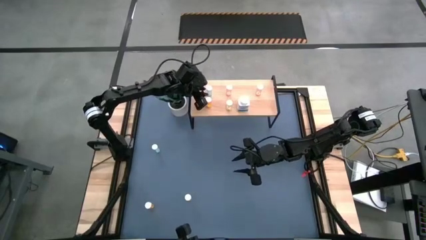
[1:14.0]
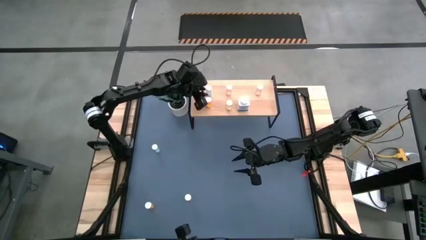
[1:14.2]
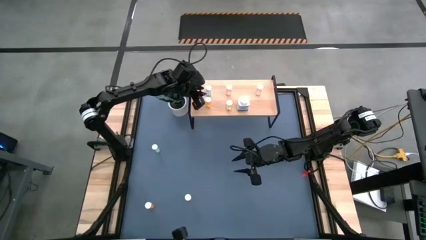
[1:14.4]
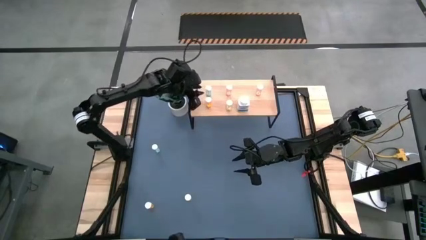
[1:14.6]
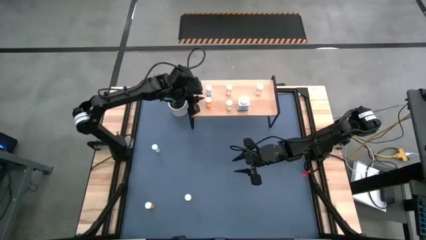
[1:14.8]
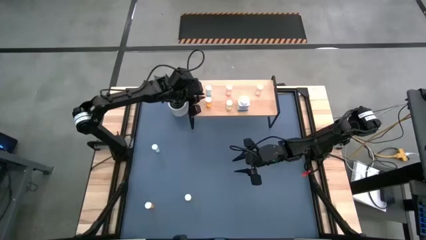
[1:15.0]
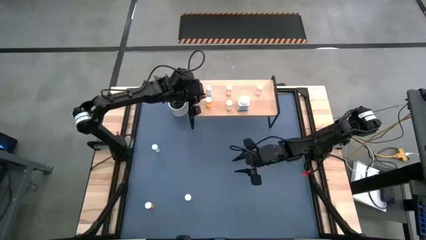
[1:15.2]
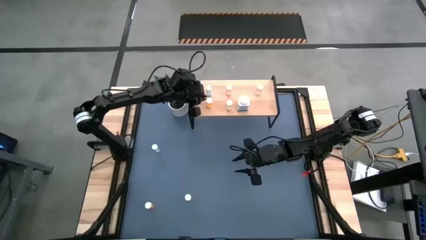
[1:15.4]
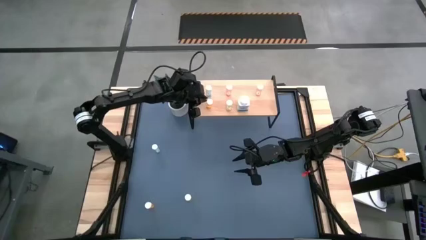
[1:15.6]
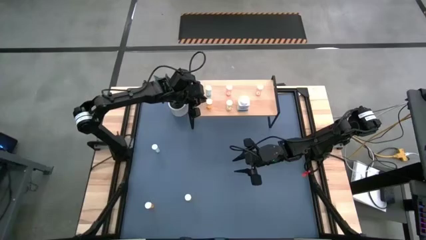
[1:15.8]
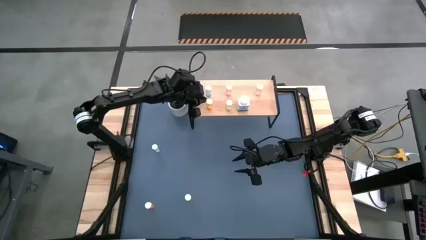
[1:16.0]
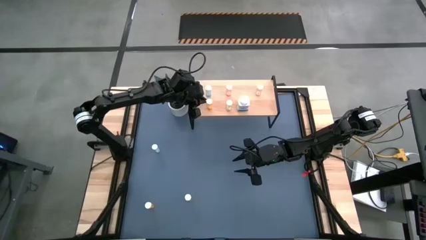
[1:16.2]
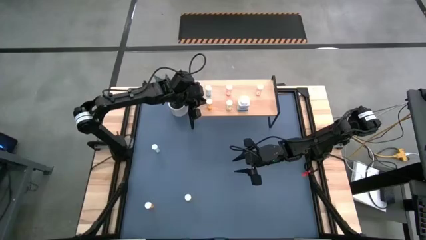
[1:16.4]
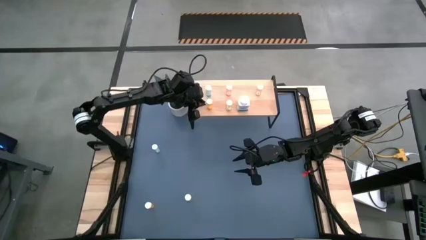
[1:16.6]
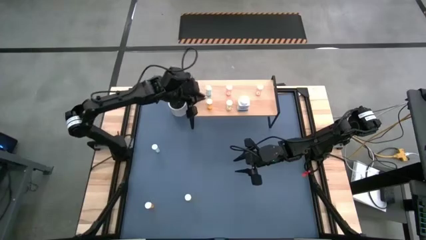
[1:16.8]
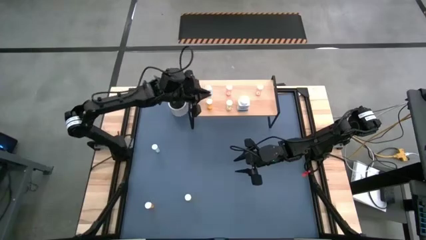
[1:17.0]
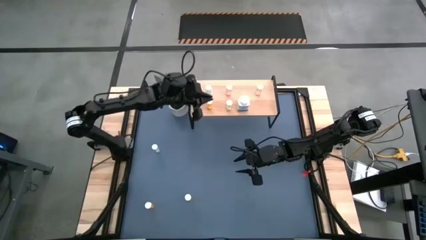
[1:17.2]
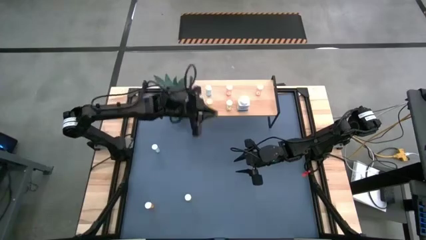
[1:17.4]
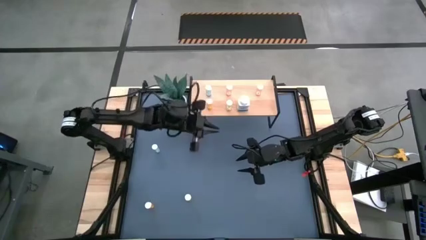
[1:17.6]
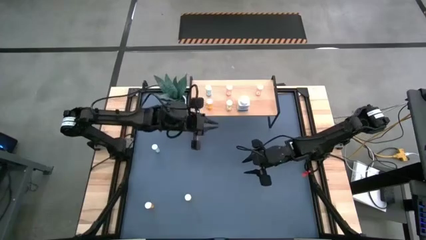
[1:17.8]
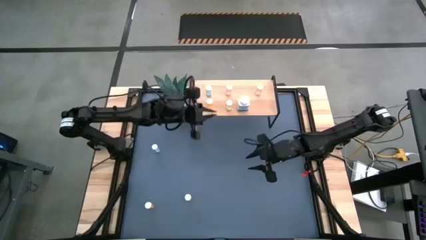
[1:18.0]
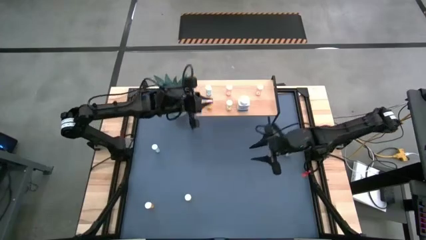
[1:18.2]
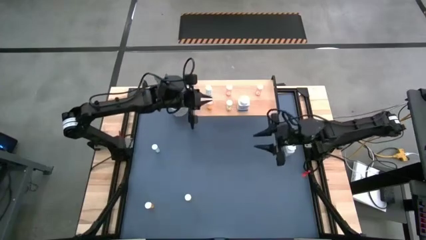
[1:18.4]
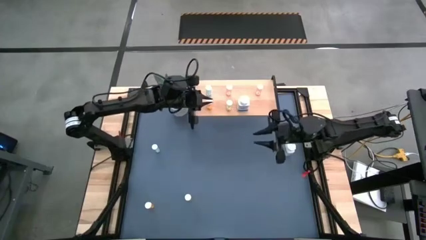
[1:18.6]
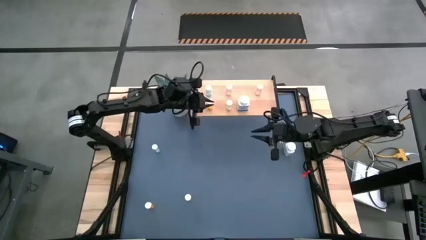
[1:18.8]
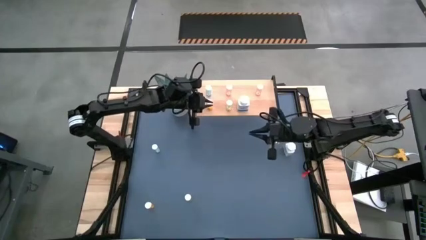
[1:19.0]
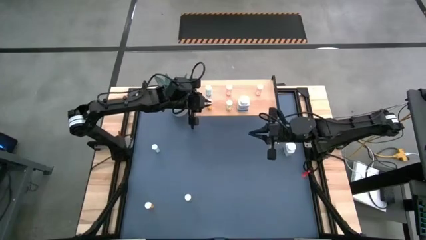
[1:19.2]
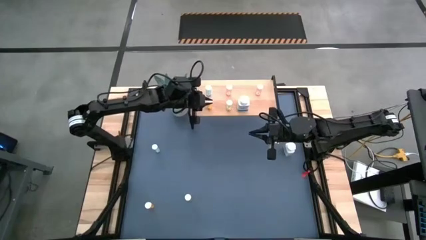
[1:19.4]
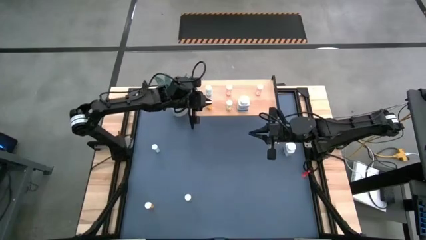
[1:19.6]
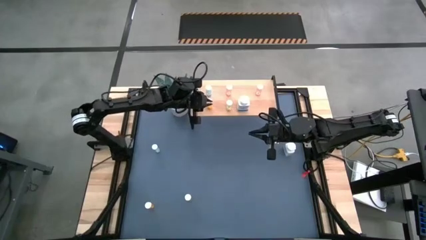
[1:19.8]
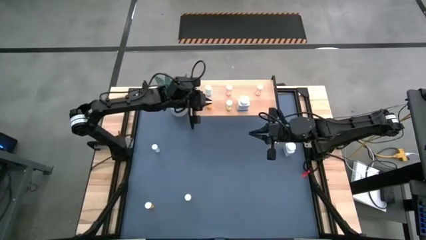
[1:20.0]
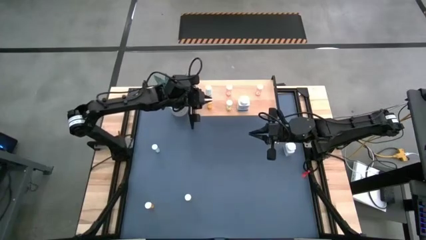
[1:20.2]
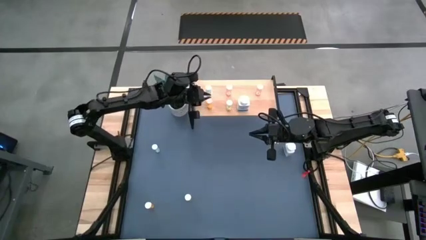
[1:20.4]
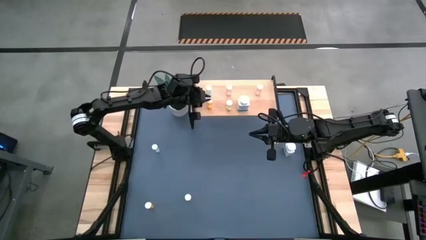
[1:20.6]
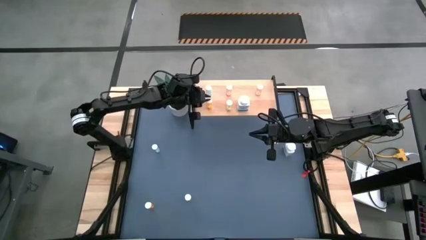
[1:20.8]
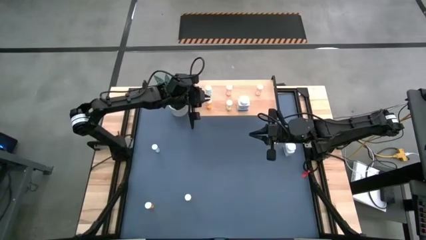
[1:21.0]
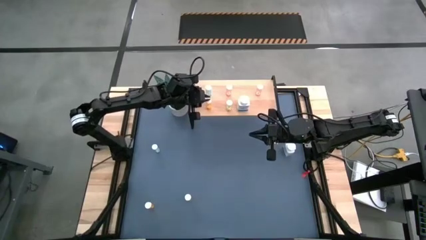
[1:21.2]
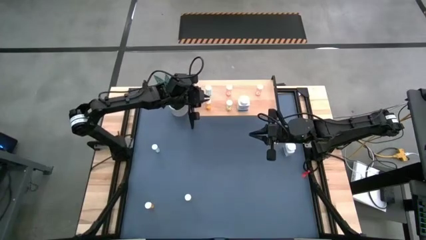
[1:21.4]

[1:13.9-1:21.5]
Task: Pick and place medicine bottles onto shelf by color
Adjust the orange medicine bottle on the shelf

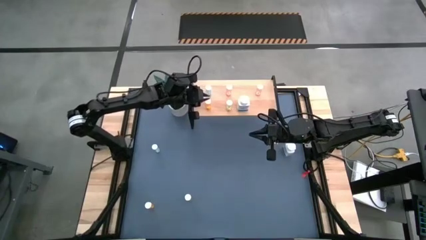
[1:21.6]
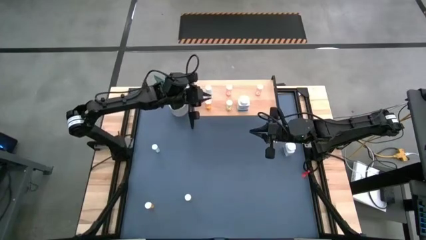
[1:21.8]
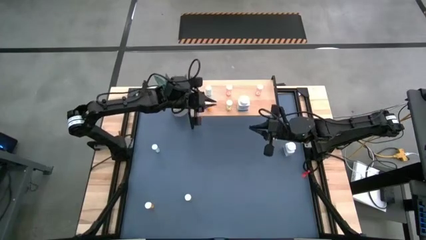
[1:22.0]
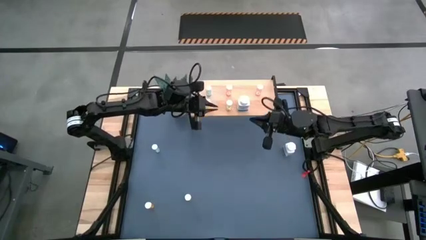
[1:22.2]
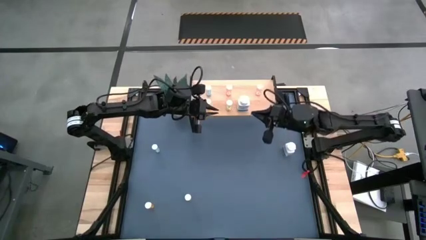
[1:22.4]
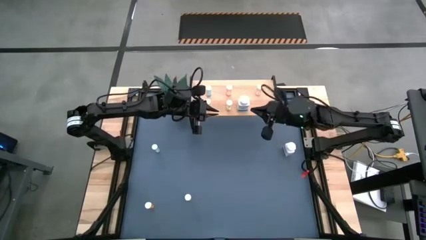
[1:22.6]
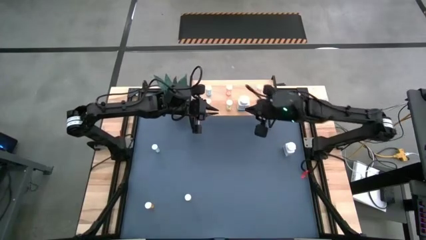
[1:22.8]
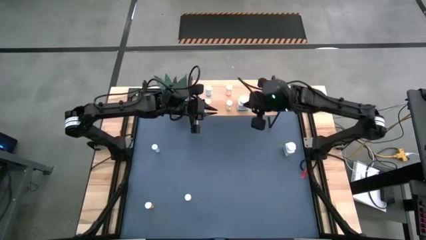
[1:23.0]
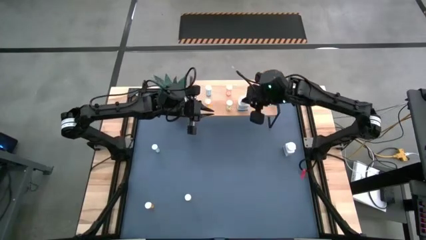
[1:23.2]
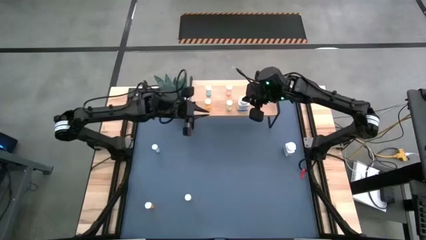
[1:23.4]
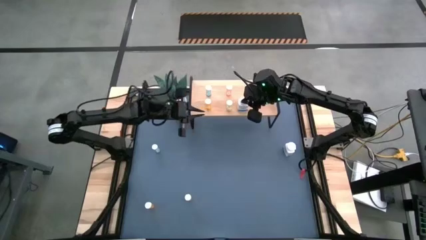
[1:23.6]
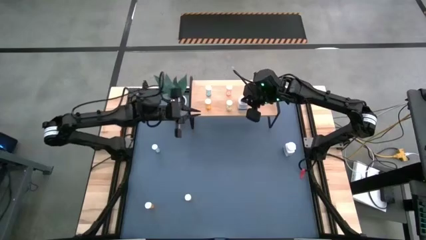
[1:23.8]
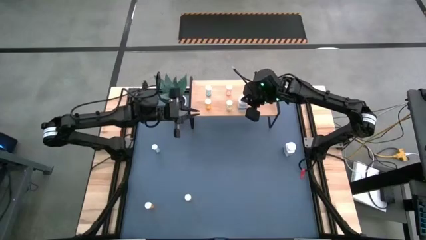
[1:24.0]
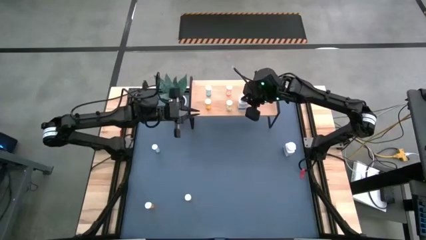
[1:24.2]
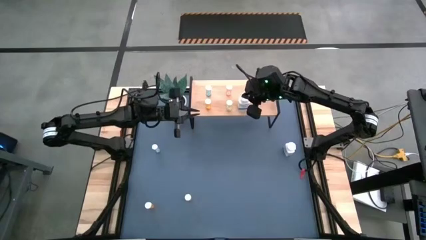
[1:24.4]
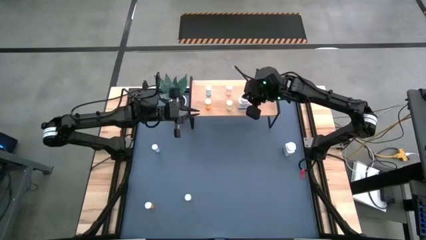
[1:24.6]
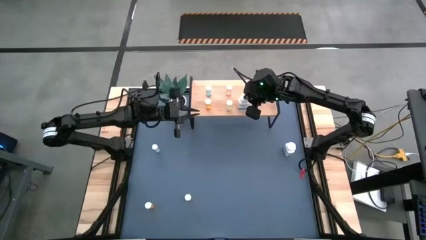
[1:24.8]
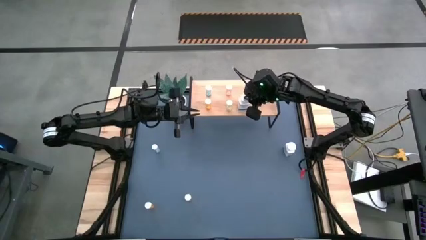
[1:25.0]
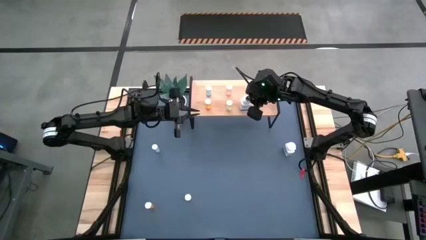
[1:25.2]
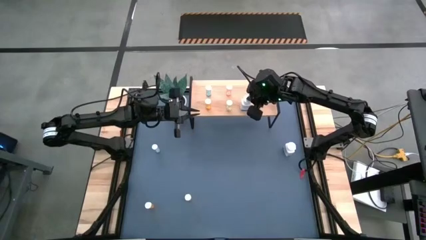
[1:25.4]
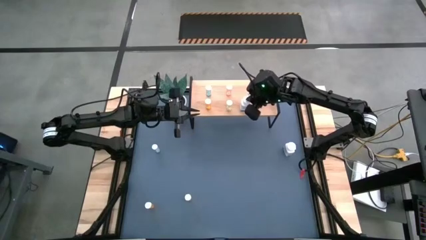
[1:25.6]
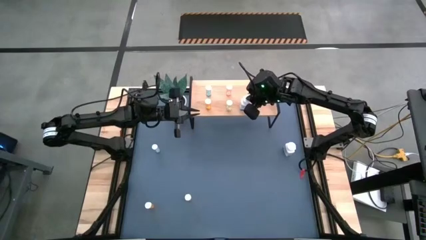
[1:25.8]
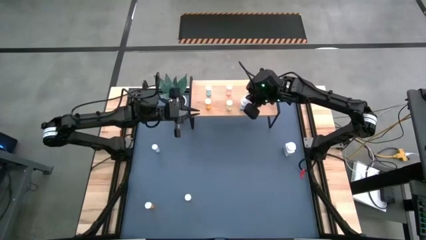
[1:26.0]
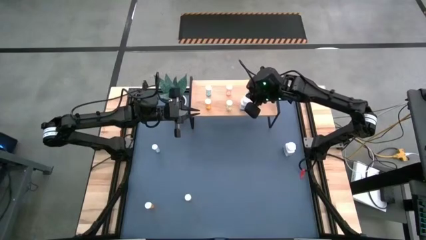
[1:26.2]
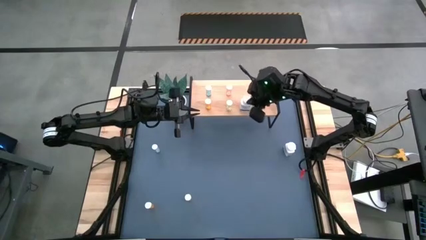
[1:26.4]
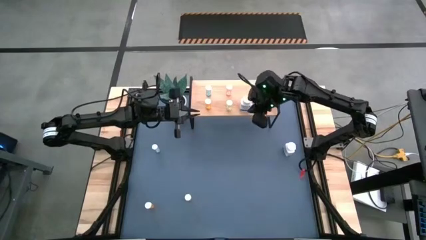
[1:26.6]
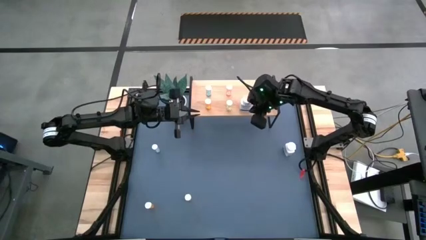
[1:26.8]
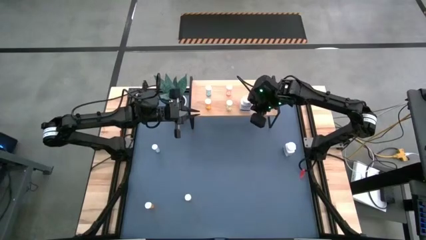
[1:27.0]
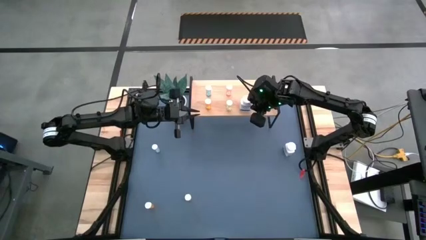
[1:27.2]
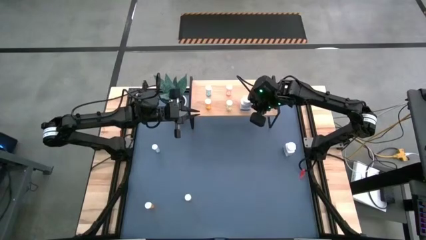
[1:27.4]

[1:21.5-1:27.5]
Adjust the white medicine bottle on the shelf

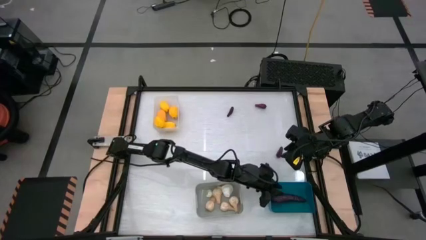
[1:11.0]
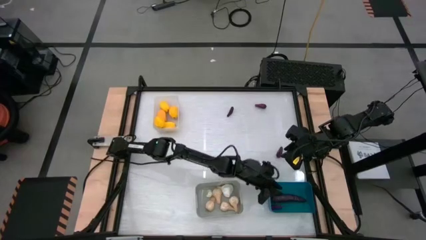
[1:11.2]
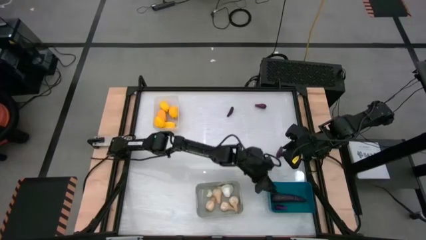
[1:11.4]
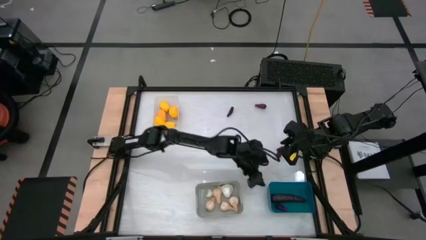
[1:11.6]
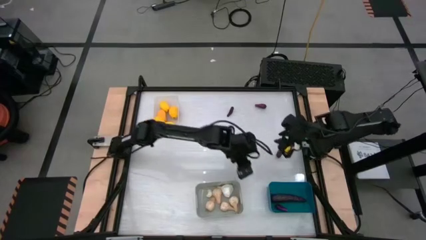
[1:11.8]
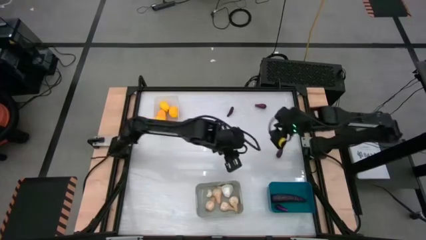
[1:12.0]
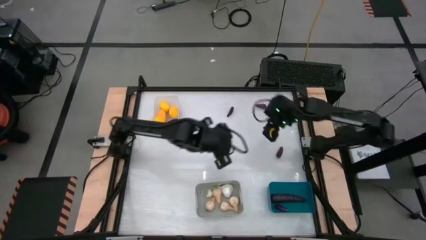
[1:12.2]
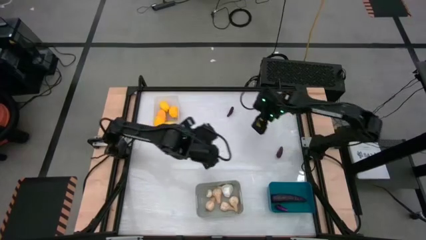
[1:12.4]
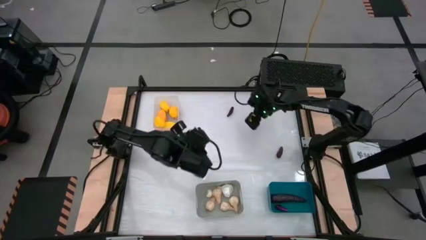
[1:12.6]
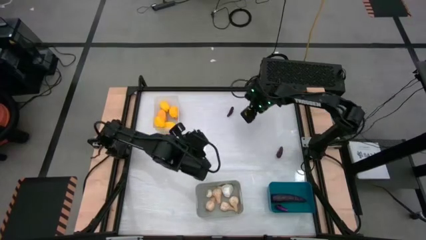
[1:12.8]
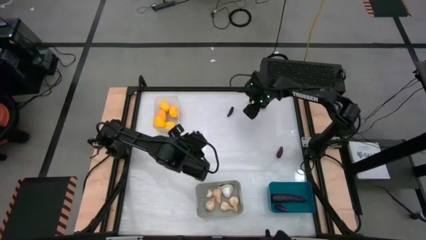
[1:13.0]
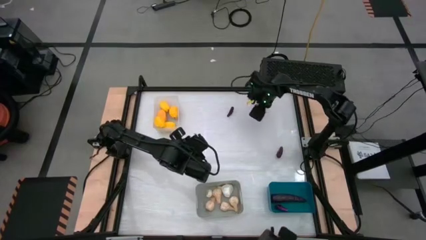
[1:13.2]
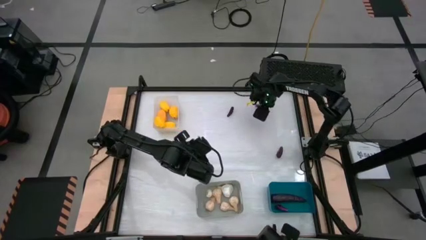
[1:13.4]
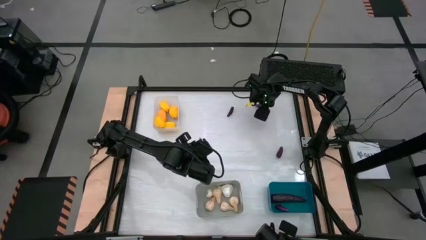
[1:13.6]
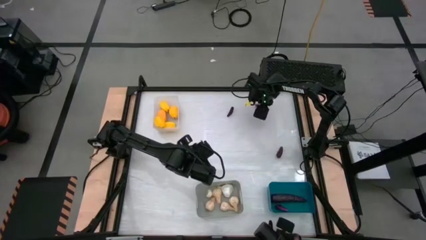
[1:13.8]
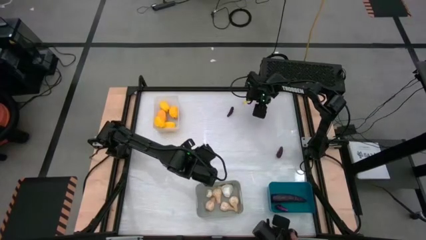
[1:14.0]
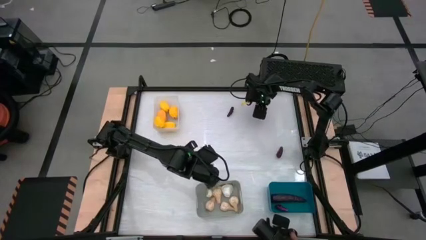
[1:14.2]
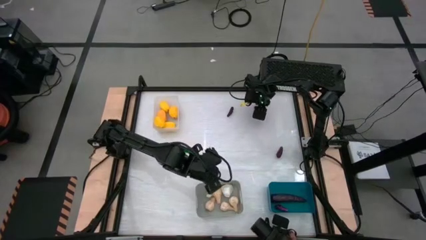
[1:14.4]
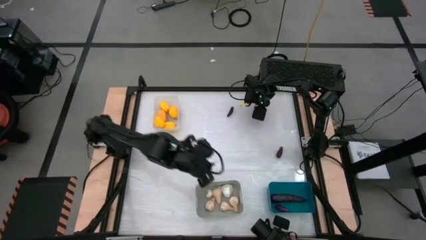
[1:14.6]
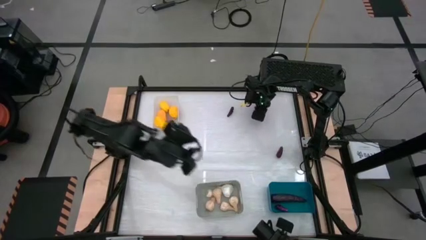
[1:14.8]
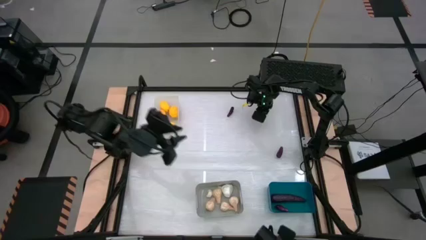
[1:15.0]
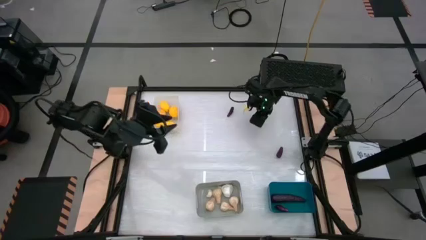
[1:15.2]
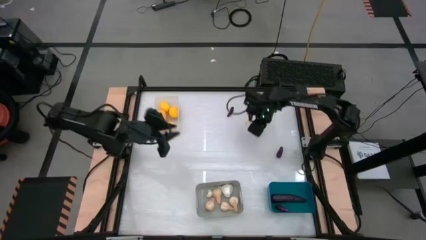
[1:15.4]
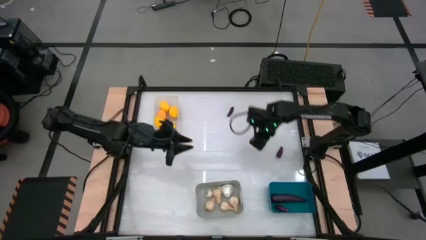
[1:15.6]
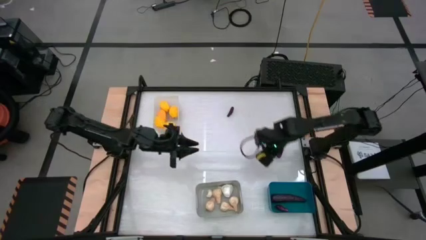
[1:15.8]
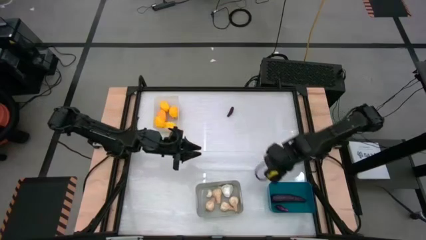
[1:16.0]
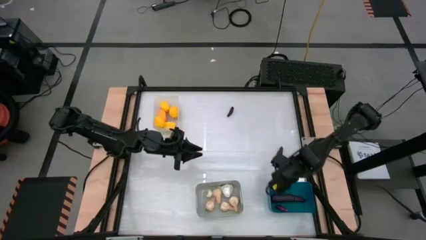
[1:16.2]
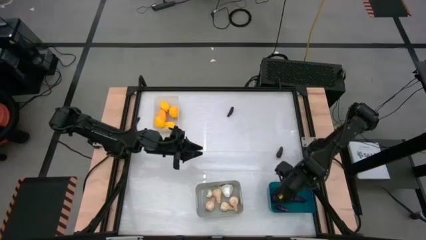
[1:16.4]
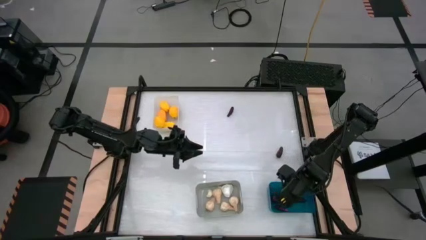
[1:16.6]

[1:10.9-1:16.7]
Task: Sort produce into baskets
Put the eggplant into the blue bin
